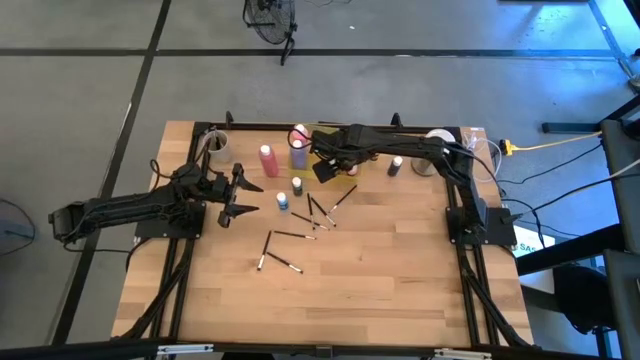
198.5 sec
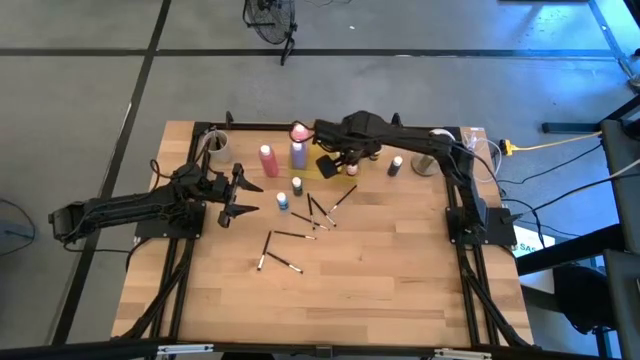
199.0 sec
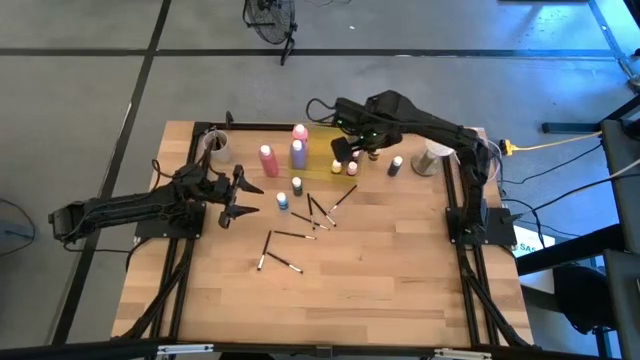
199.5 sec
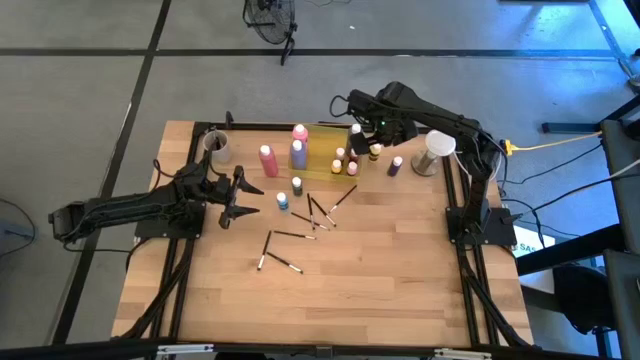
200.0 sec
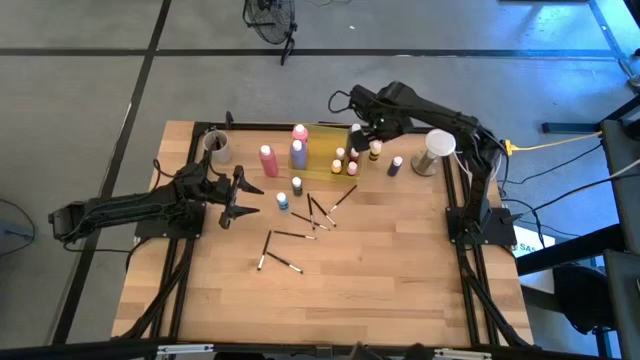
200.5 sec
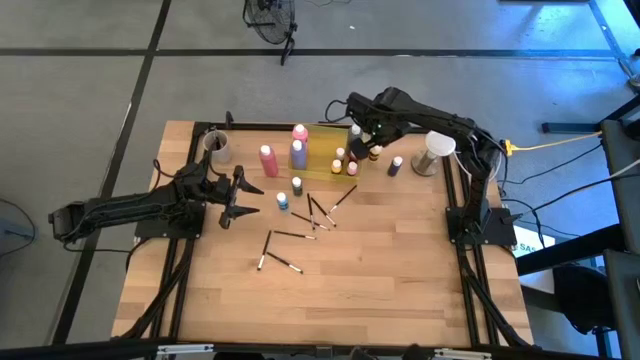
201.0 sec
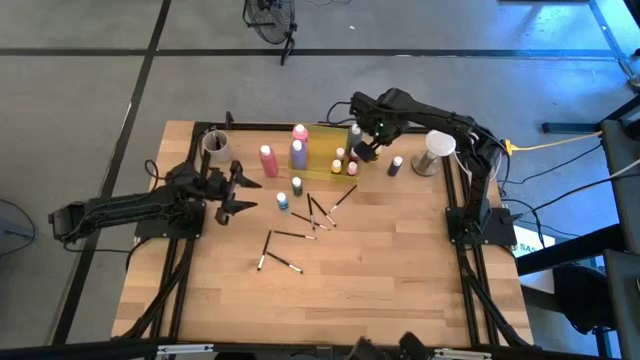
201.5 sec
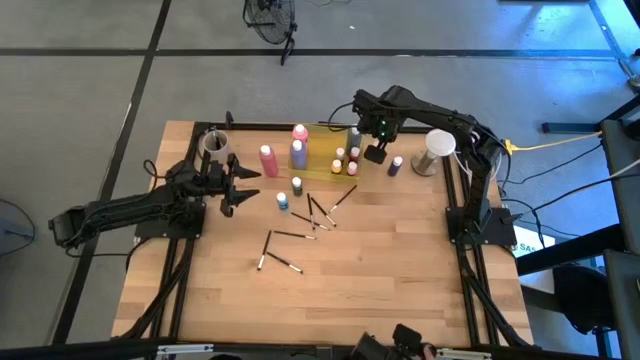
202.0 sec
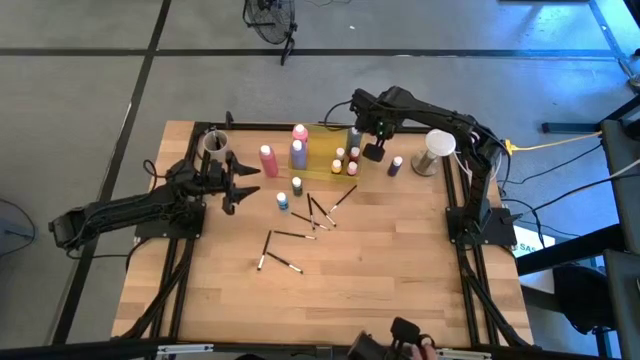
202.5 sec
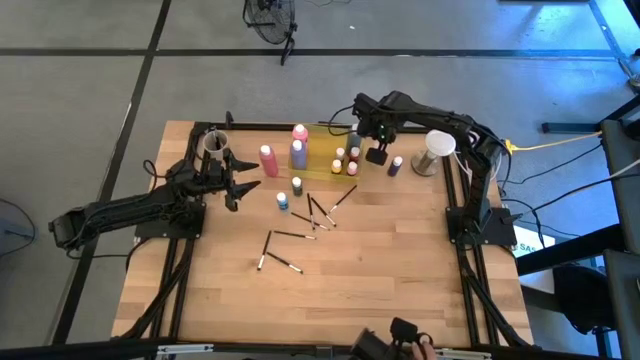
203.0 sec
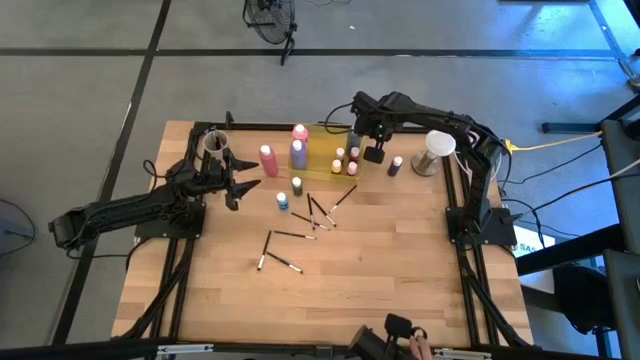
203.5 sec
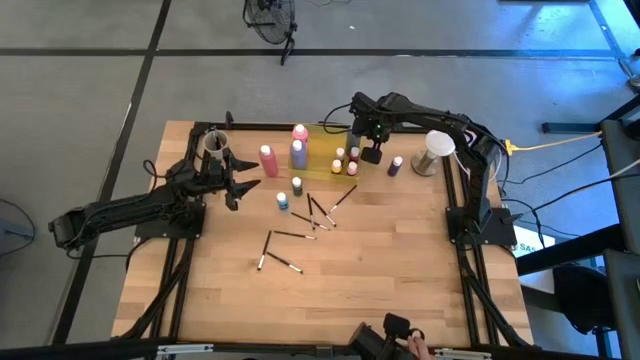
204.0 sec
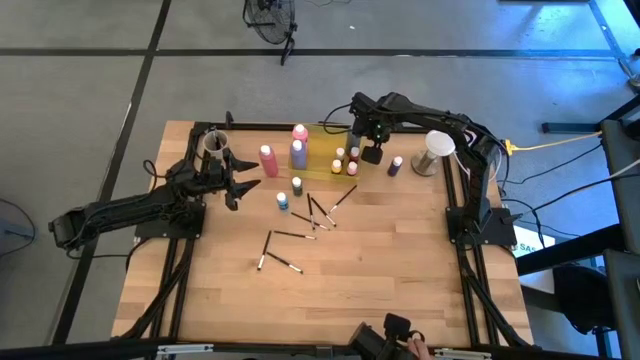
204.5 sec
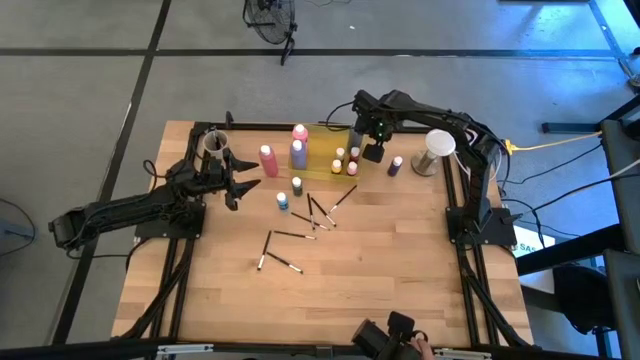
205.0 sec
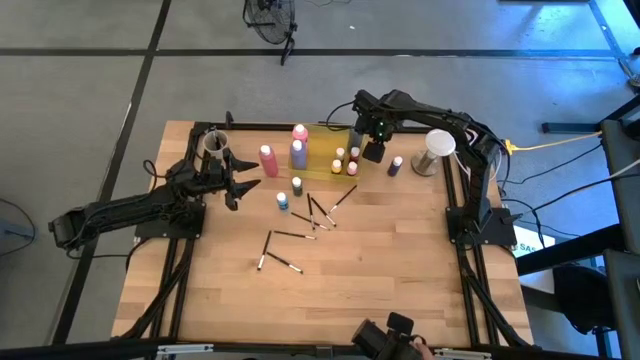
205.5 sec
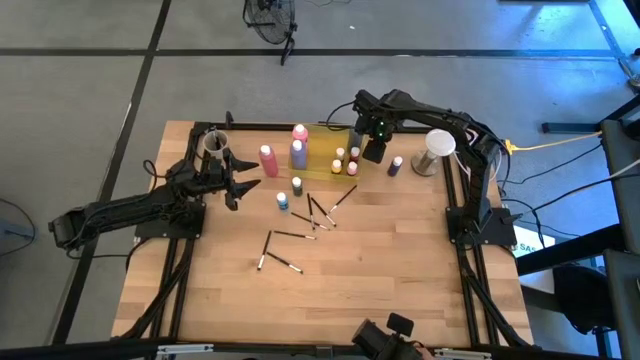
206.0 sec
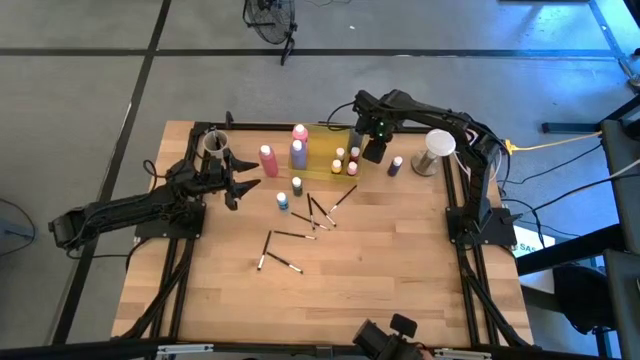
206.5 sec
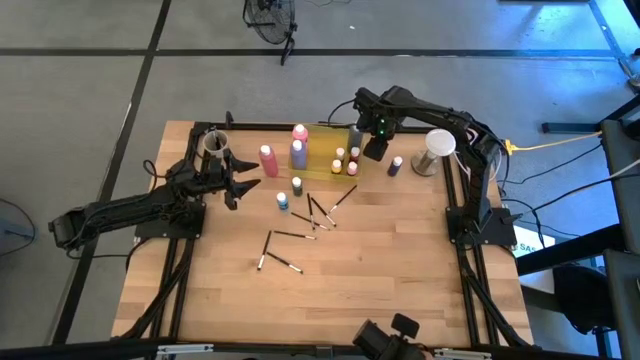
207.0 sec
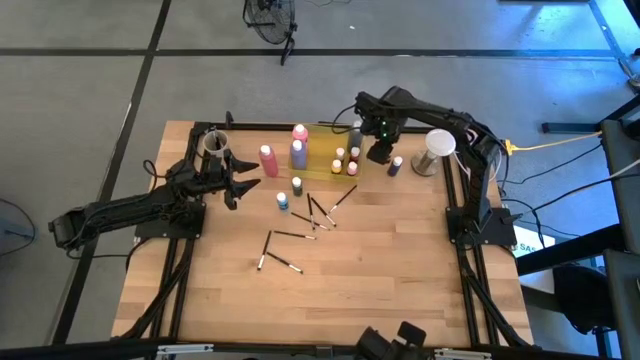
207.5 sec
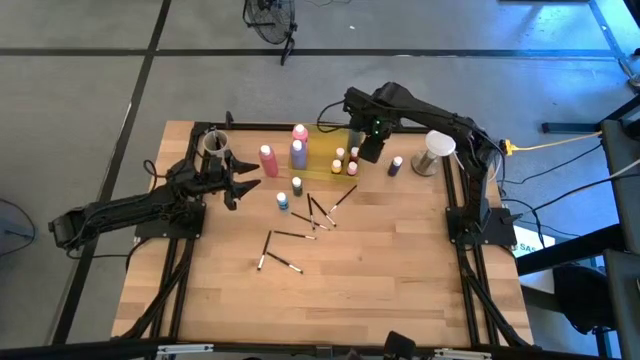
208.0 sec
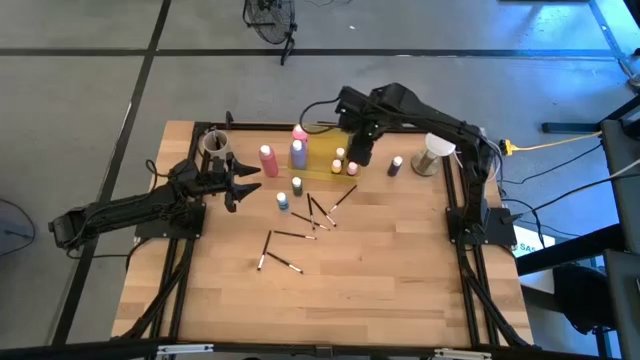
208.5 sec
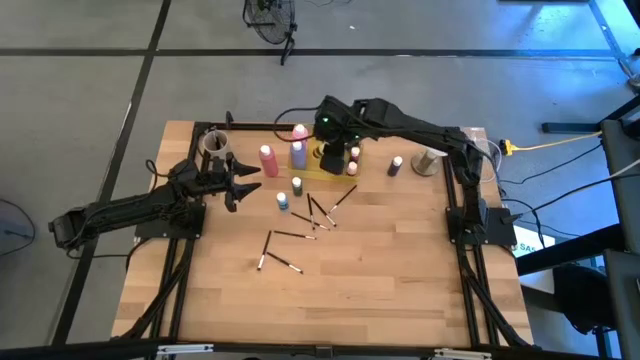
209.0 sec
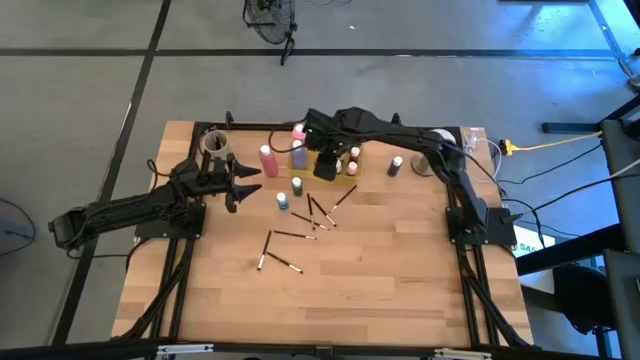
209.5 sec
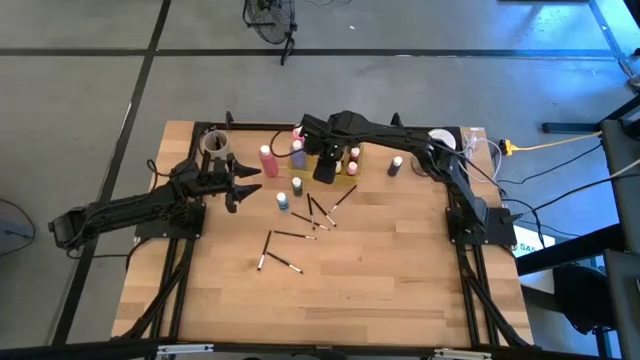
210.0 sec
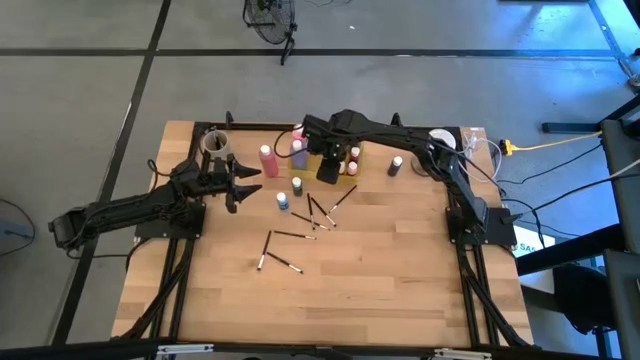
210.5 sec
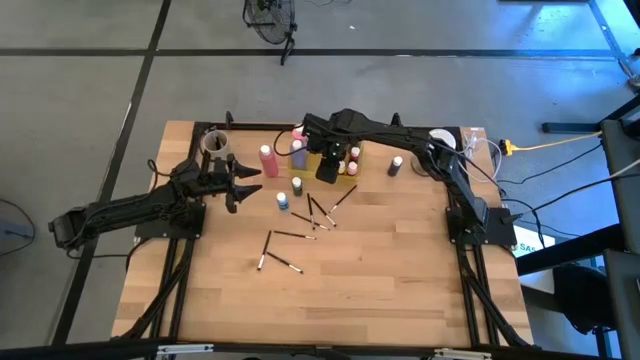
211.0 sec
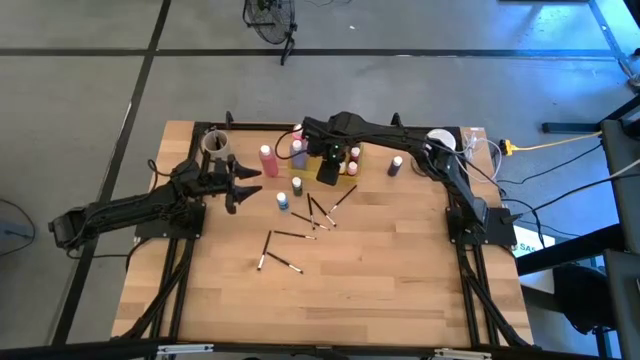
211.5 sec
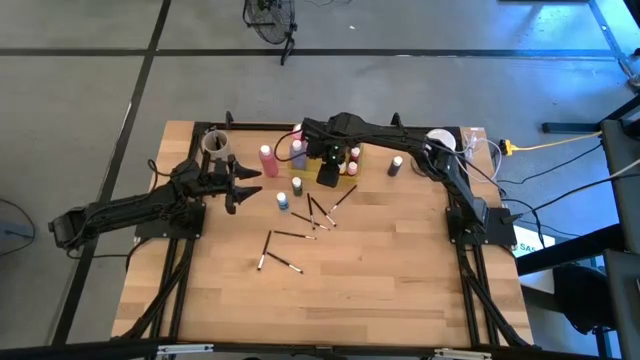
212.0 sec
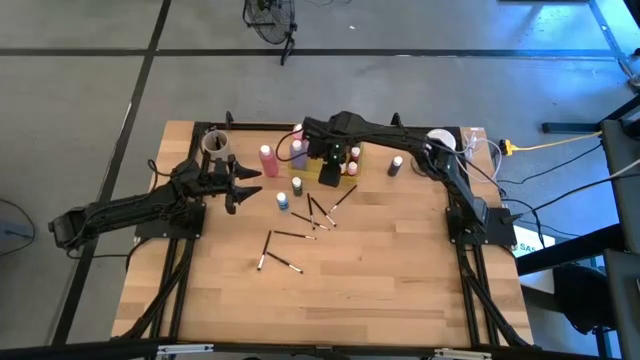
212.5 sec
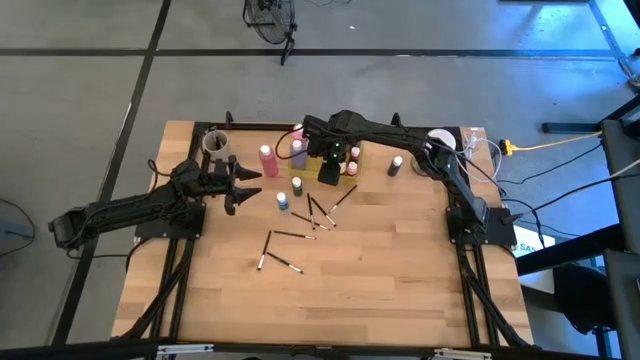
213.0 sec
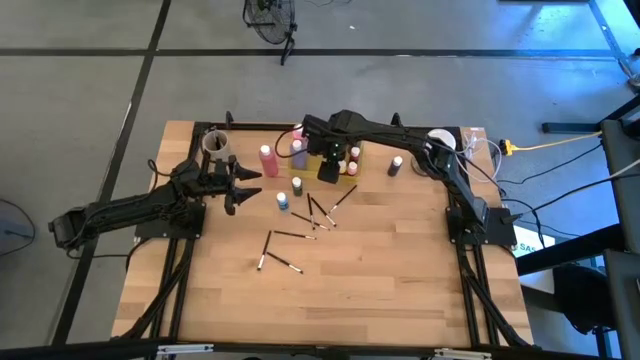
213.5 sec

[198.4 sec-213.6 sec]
Task: Pick & Place Paint Supplies
Put the small light yellow paint bottle into the yellow bin

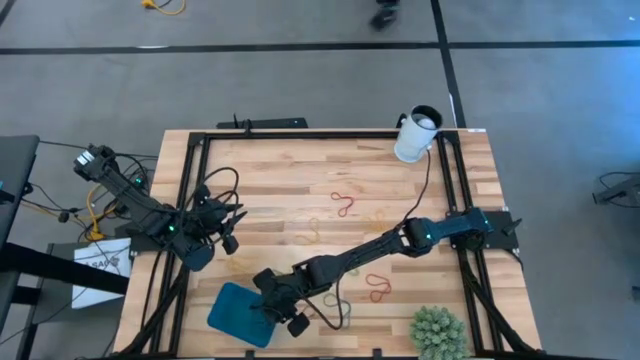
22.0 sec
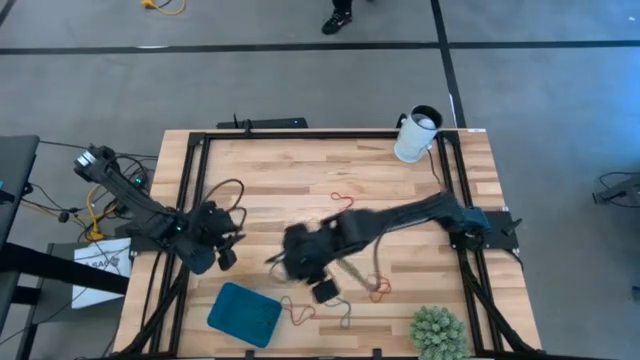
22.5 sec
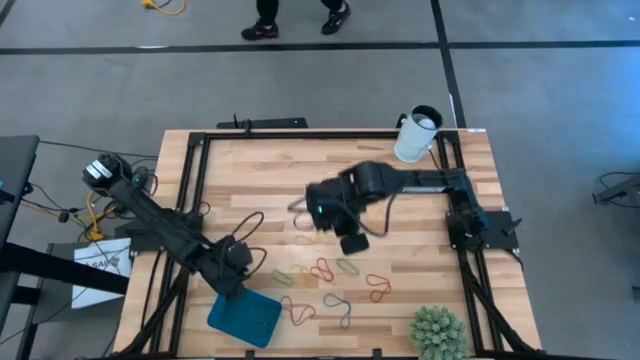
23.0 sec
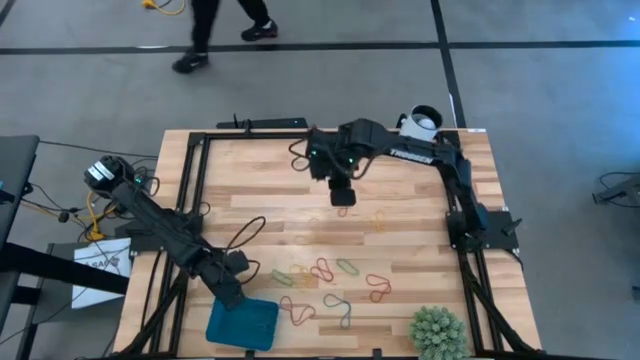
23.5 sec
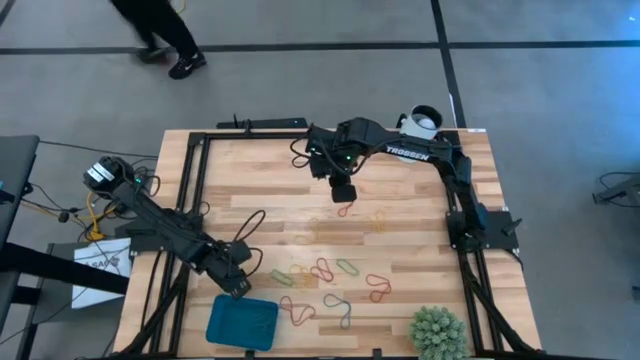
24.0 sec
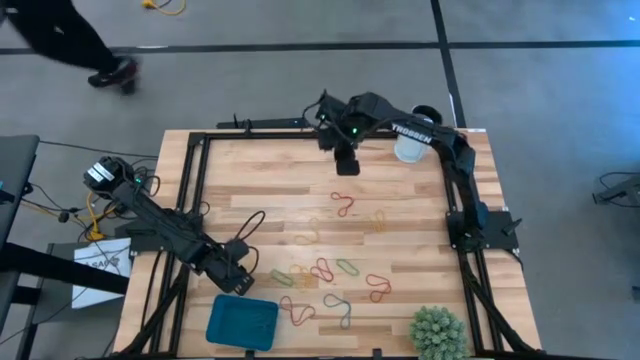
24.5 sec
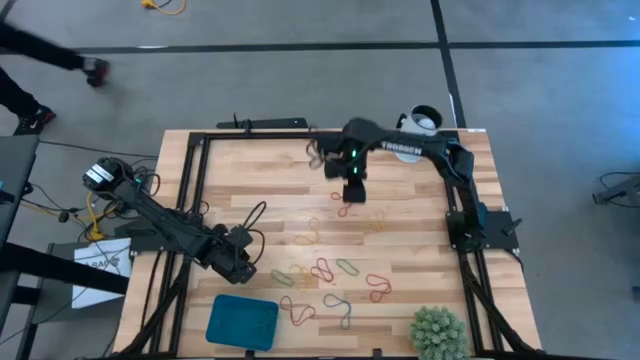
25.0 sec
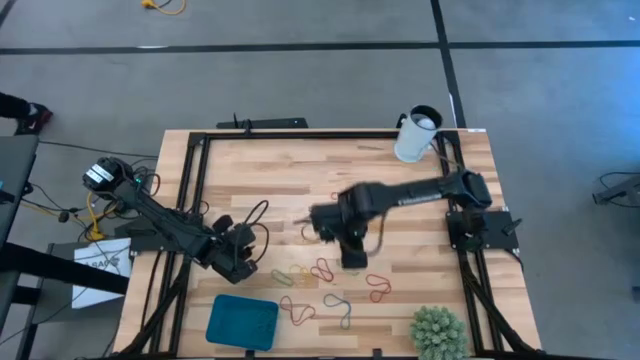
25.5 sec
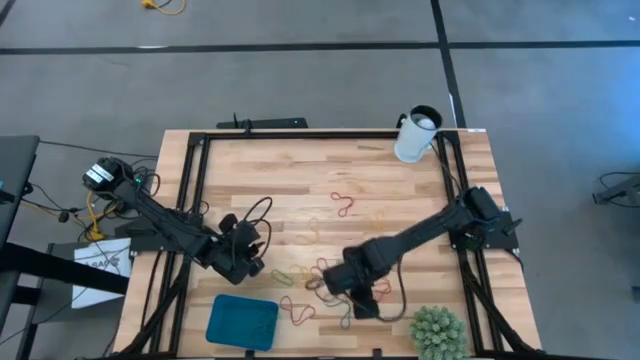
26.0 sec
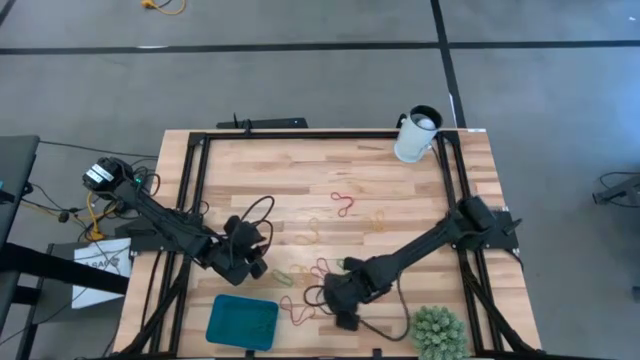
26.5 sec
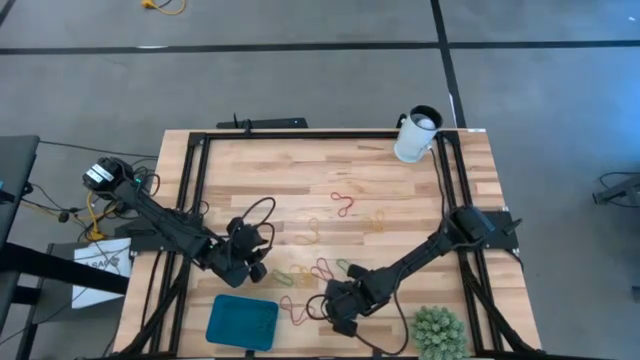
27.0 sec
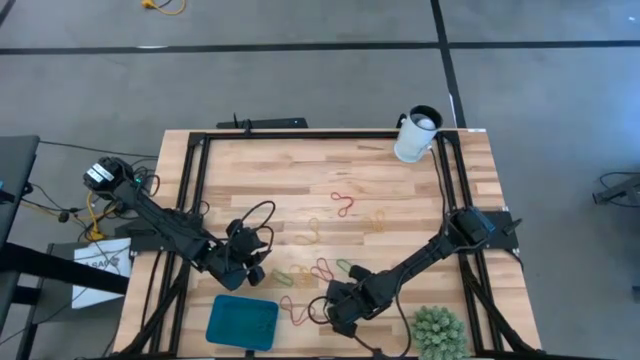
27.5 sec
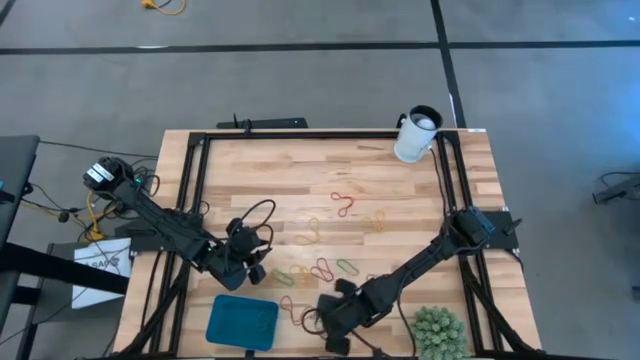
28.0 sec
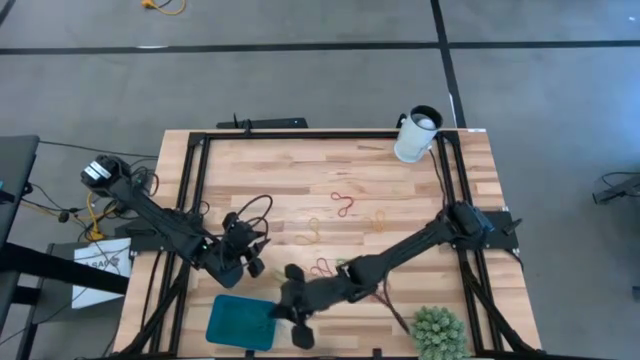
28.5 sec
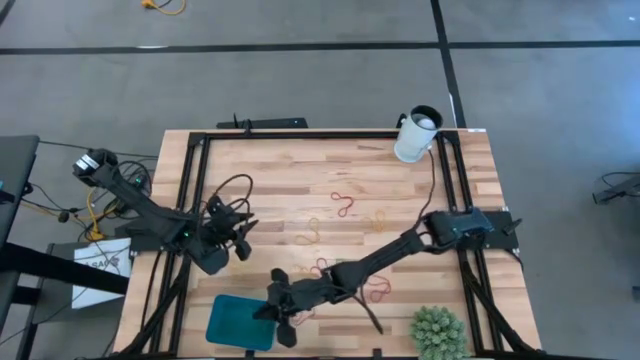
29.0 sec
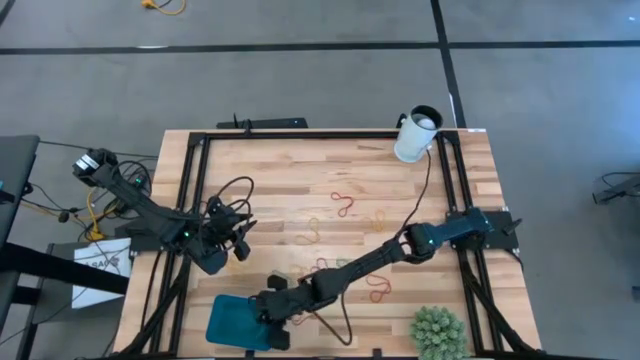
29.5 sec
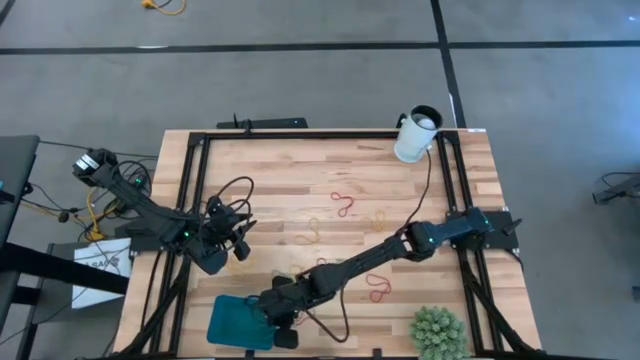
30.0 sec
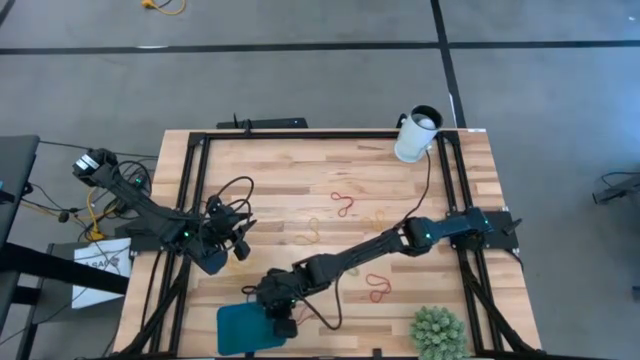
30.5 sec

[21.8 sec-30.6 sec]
Task: Pick and place items into bin
Put the blue rubber band into the blue bin
